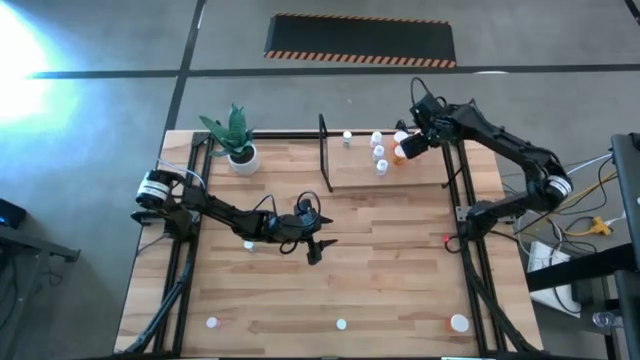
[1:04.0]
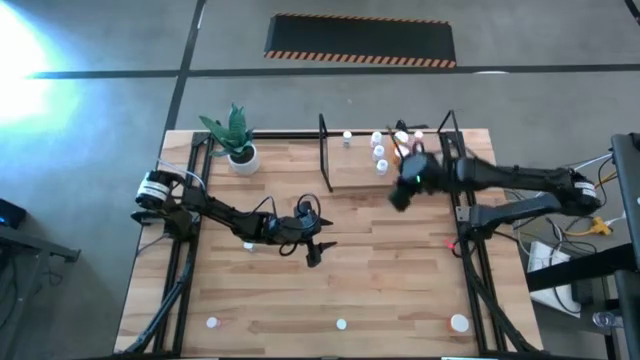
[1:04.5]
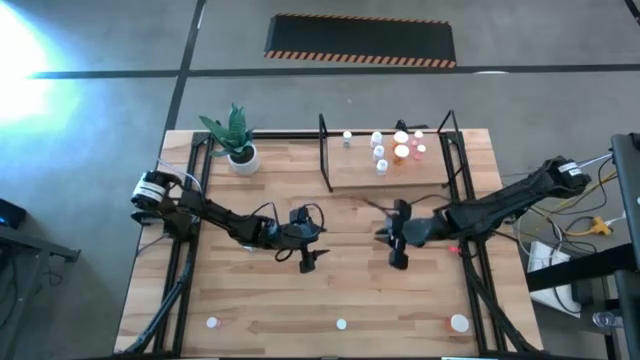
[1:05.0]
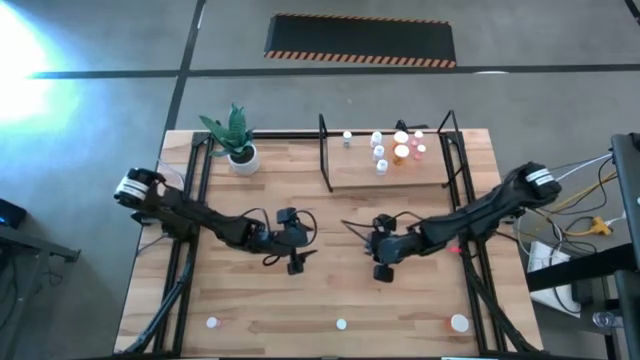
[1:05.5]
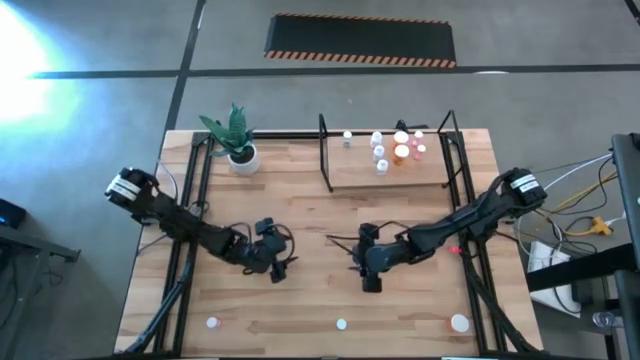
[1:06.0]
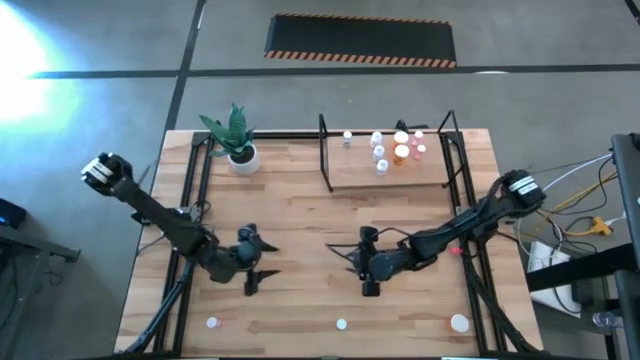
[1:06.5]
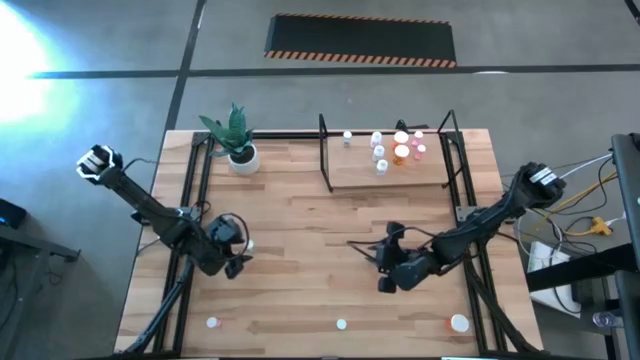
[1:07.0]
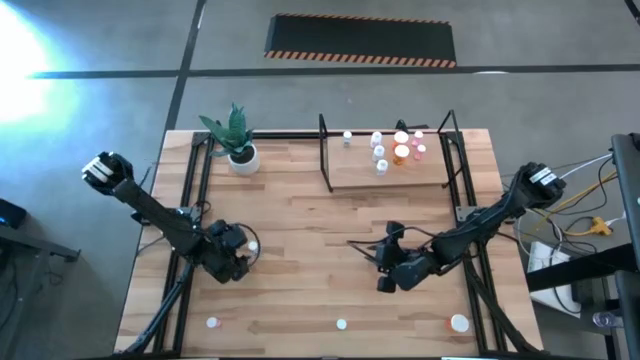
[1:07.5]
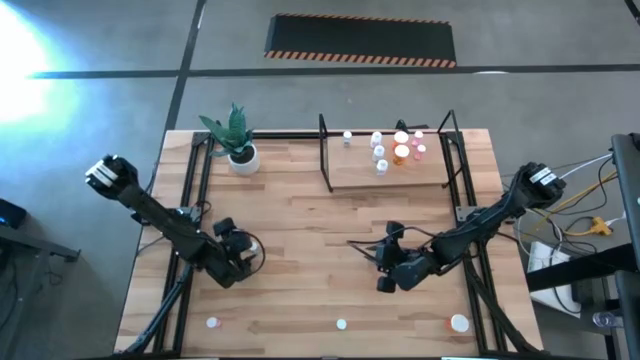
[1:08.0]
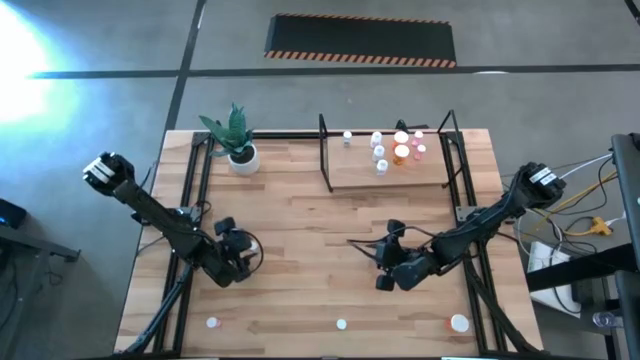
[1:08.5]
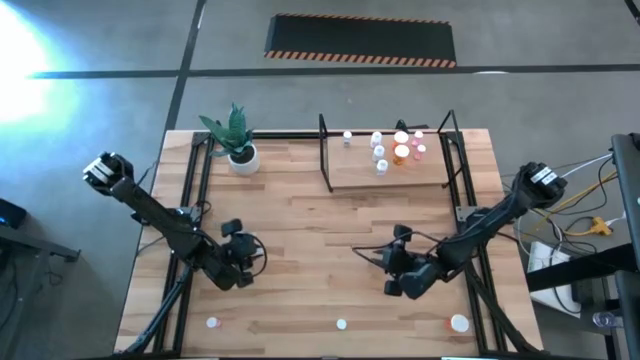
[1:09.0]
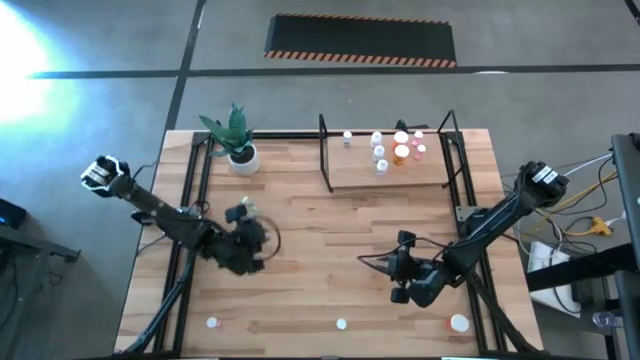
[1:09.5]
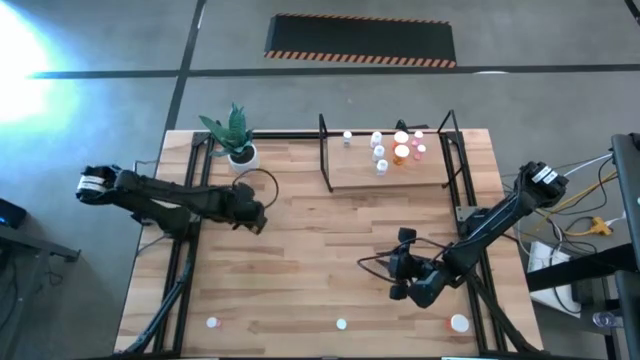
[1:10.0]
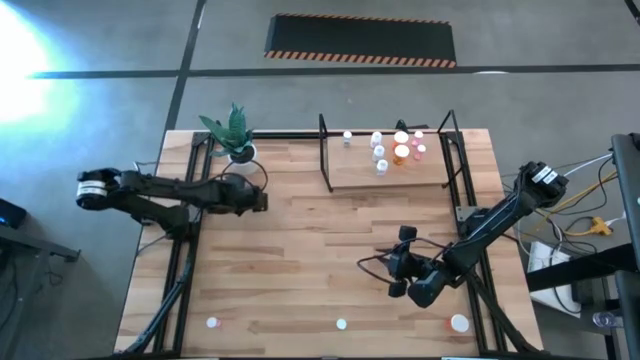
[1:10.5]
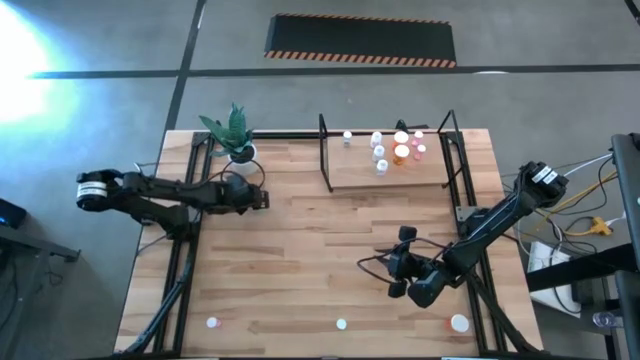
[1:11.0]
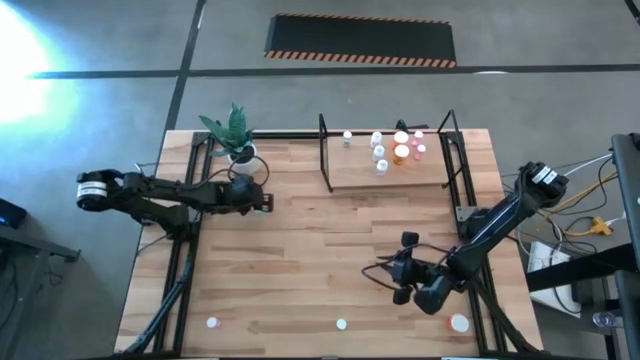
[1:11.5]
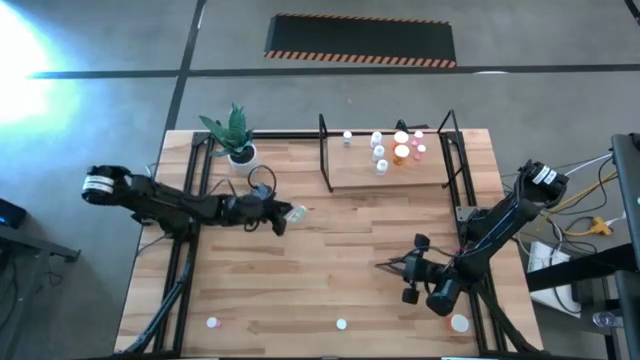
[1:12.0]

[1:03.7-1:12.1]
Task: Pick and place medicine bottles onto shelf by color
Put the top blue pill bottle on the shelf aligned with the other blue pill bottle

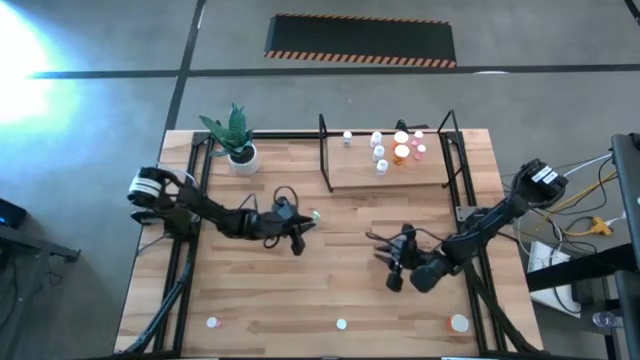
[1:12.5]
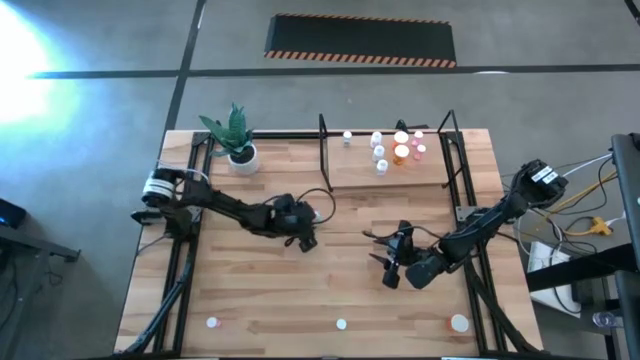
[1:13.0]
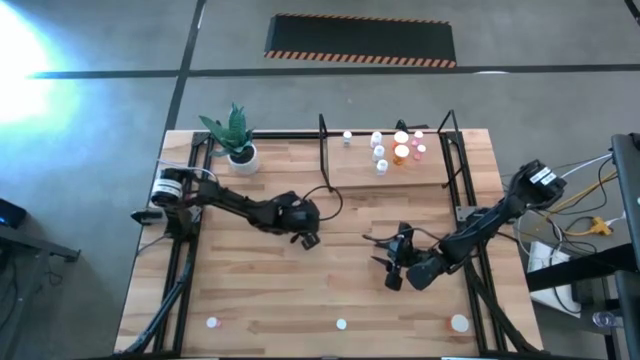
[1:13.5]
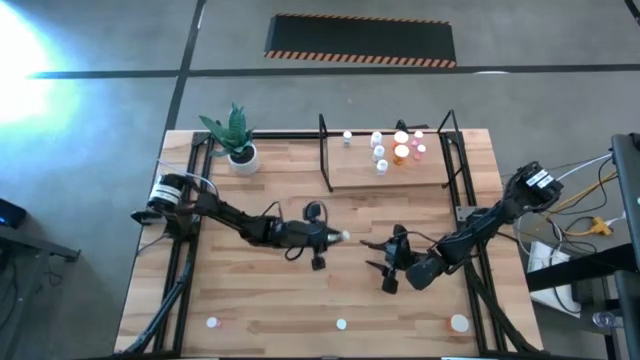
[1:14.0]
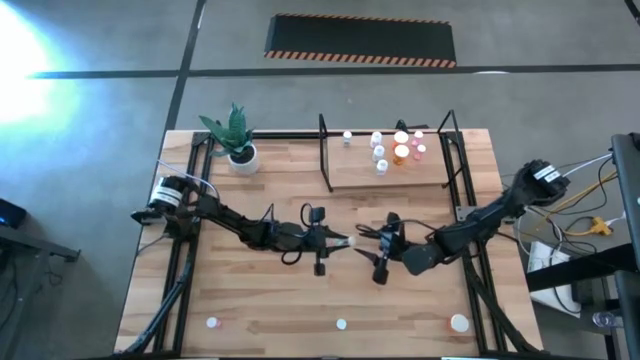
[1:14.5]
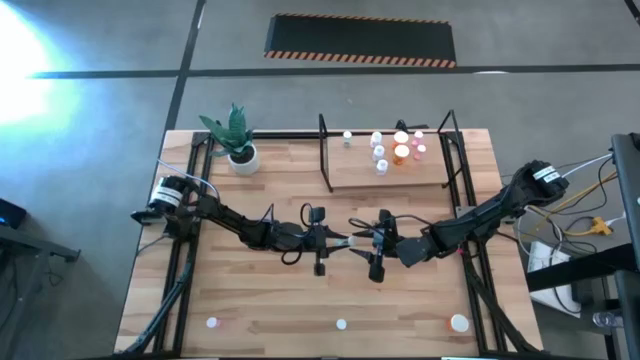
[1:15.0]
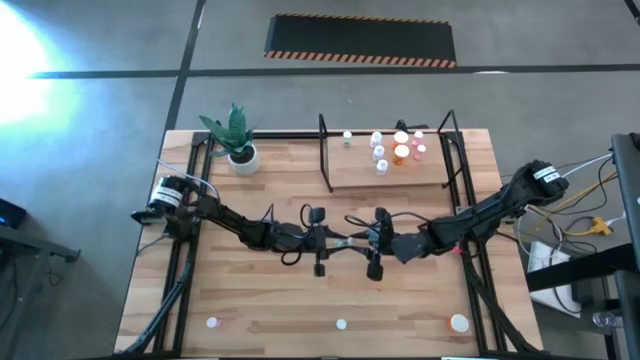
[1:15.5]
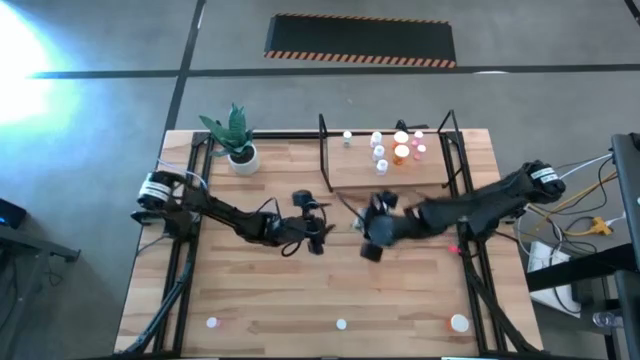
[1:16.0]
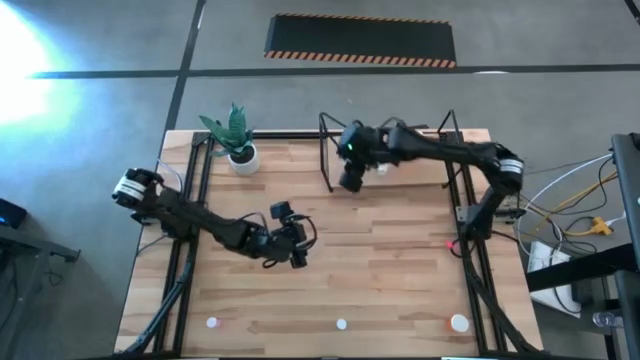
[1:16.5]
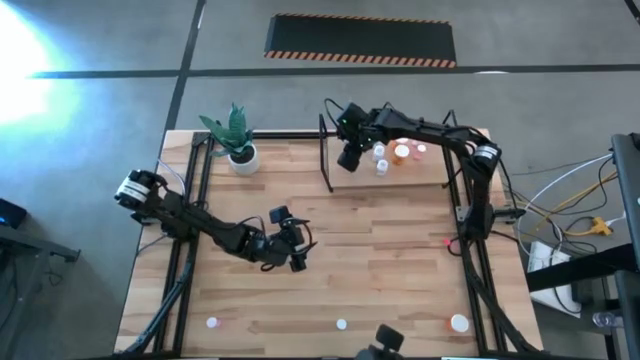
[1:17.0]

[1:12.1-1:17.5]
Put the top blue pill bottle on the shelf aligned with the other blue pill bottle

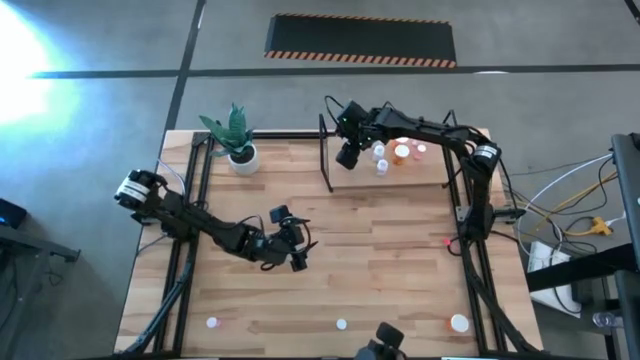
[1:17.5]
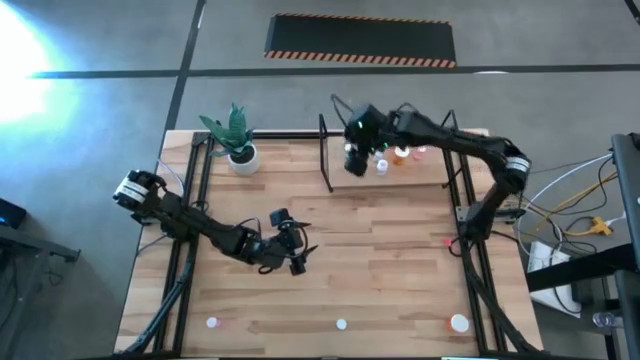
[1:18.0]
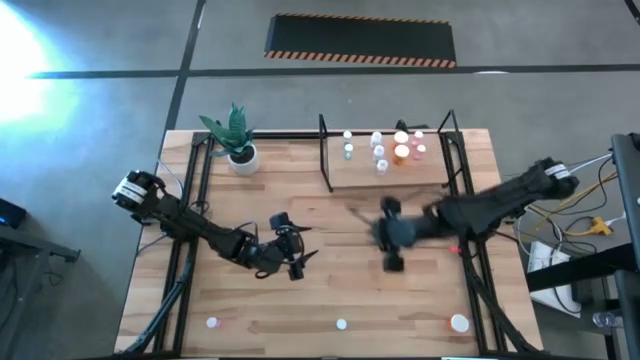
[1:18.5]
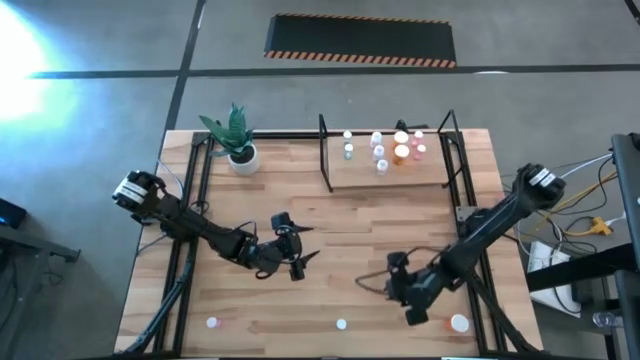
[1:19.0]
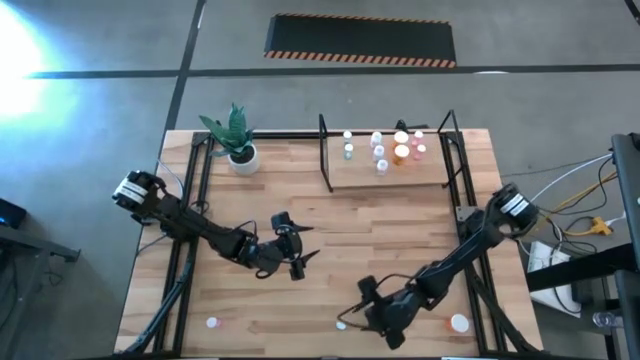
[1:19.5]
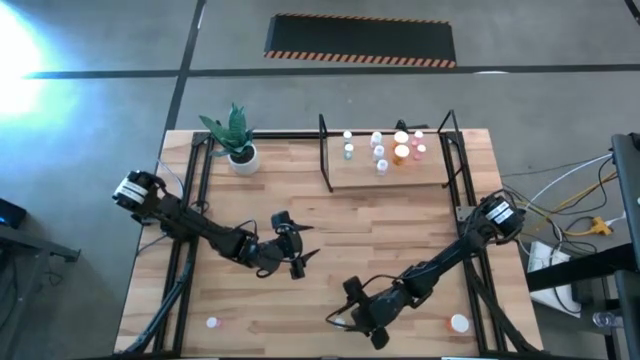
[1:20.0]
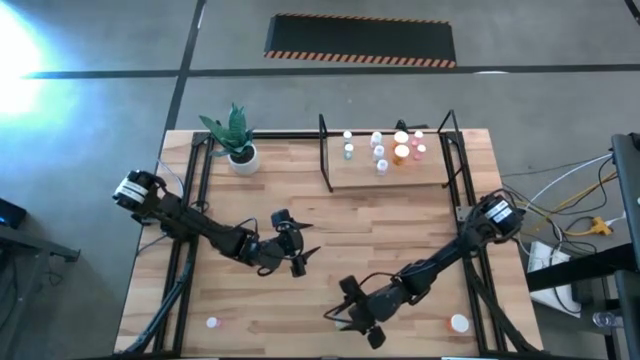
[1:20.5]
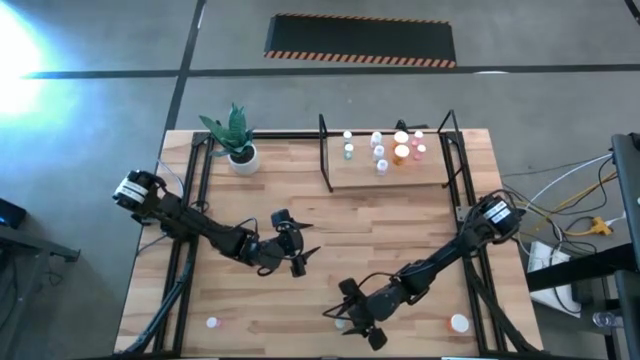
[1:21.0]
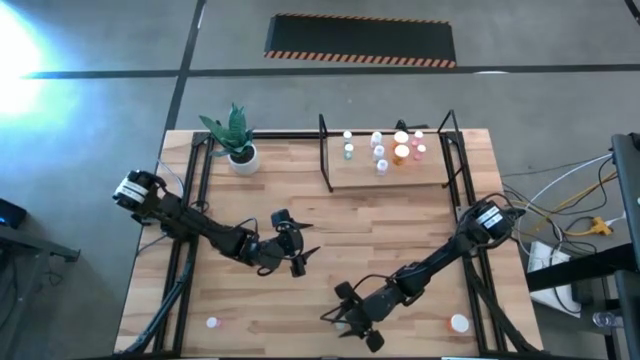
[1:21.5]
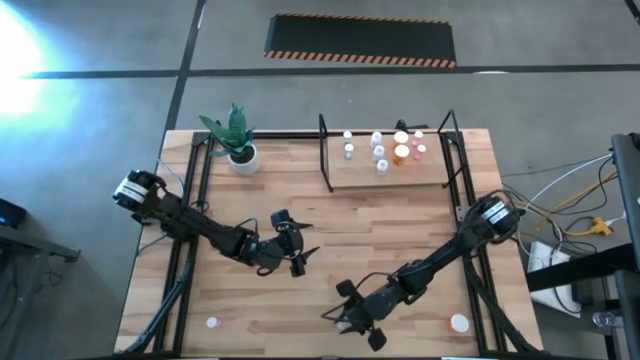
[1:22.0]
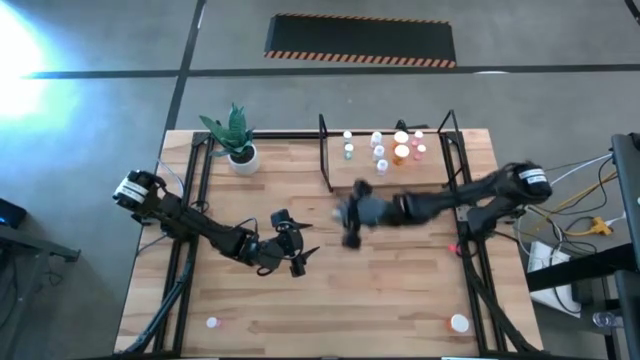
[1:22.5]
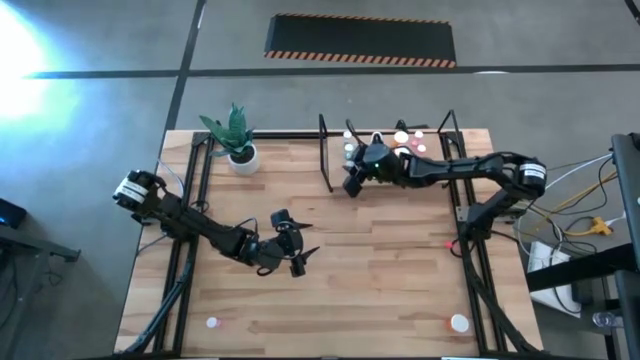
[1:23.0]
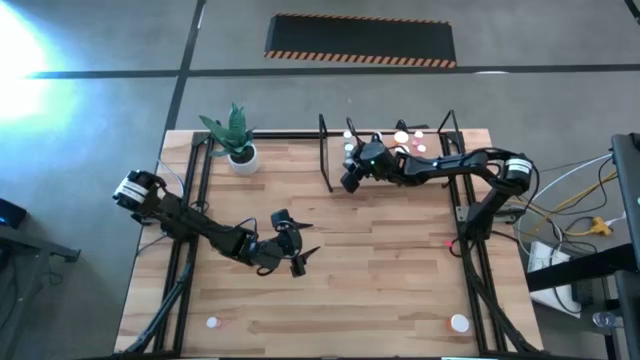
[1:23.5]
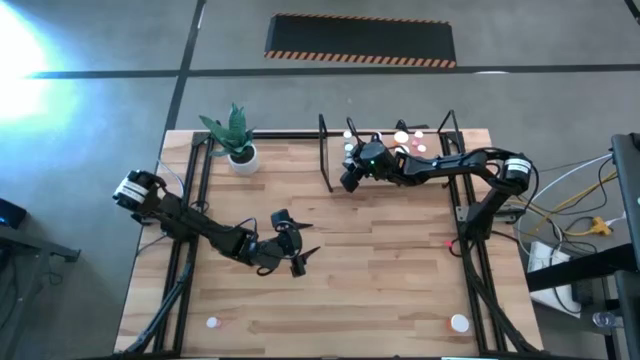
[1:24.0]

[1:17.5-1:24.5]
Put the blue pill bottle on the shelf aligned with the other blue pill bottle

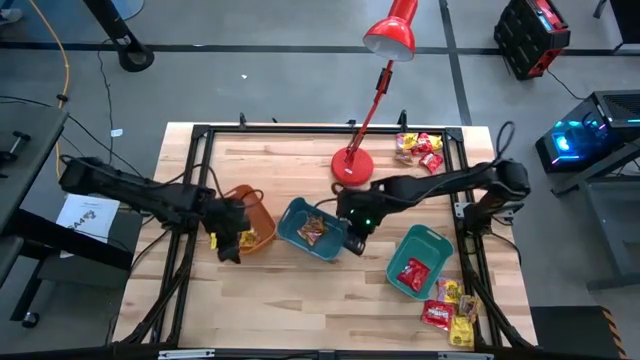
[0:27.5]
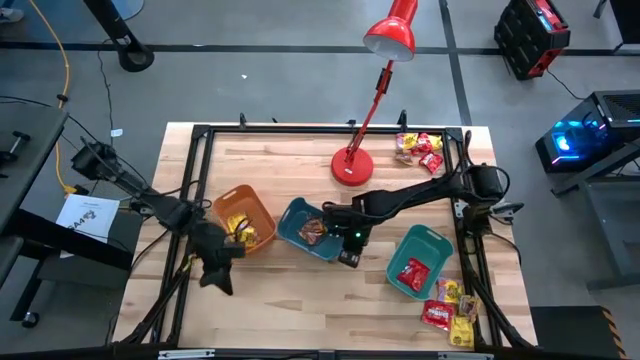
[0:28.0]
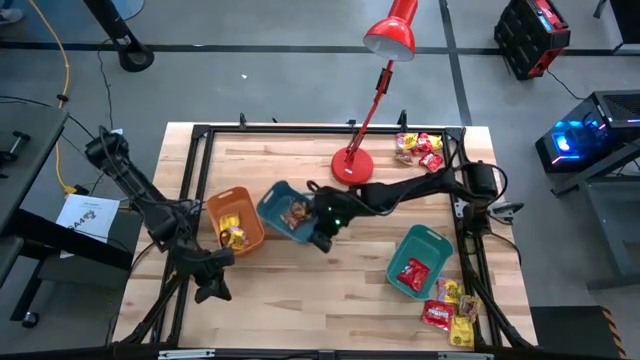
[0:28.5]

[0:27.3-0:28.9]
Task: Sort candy
Adjust the blue bin

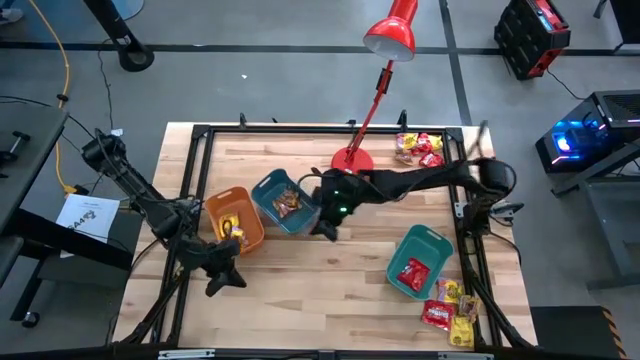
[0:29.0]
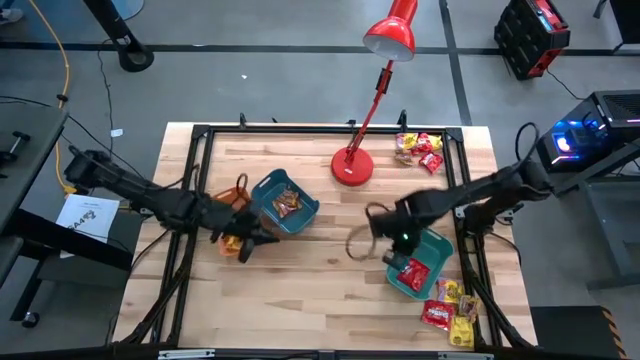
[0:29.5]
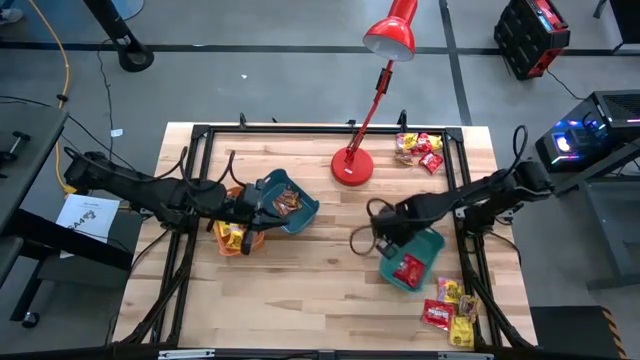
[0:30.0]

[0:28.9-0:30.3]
Move the light blue bin to the center of the table
